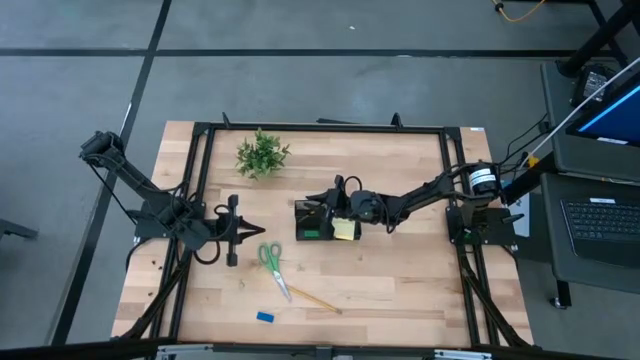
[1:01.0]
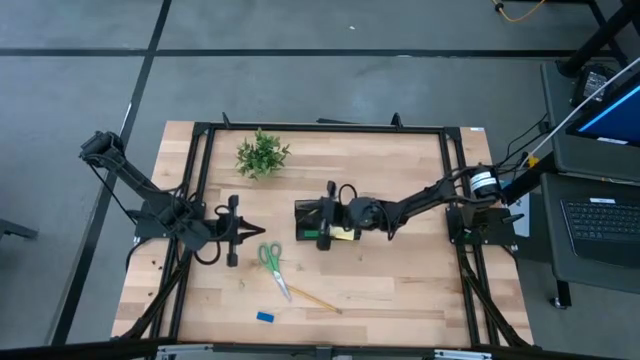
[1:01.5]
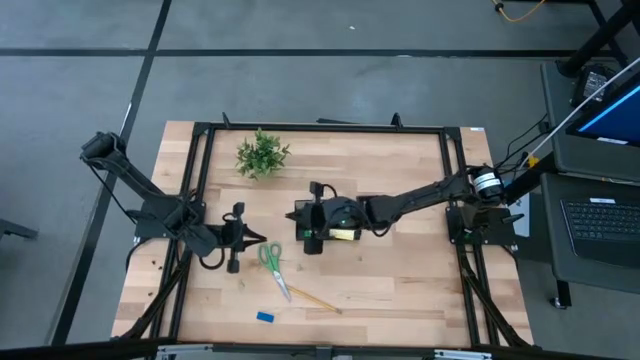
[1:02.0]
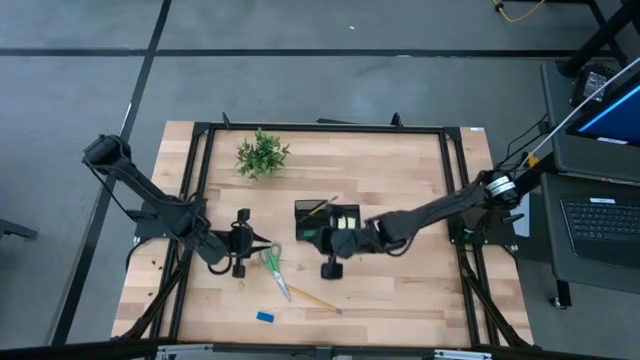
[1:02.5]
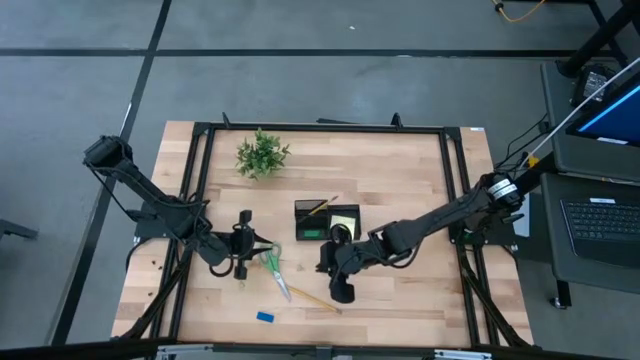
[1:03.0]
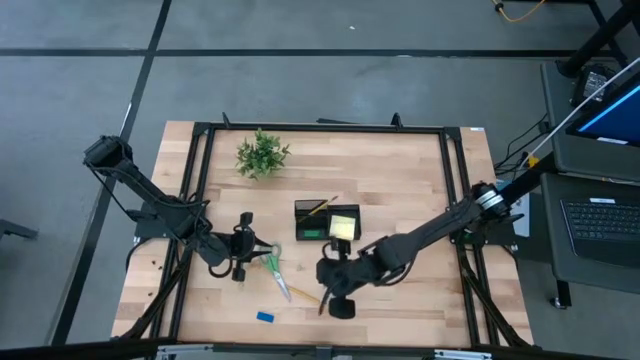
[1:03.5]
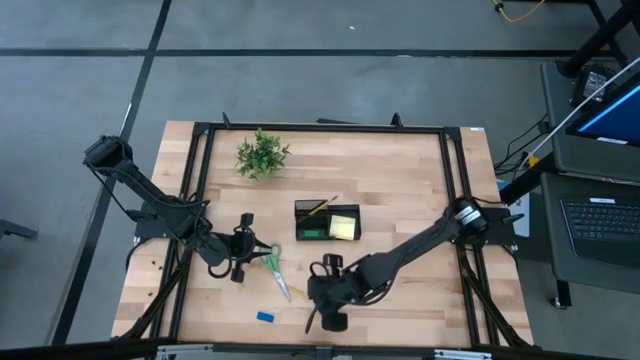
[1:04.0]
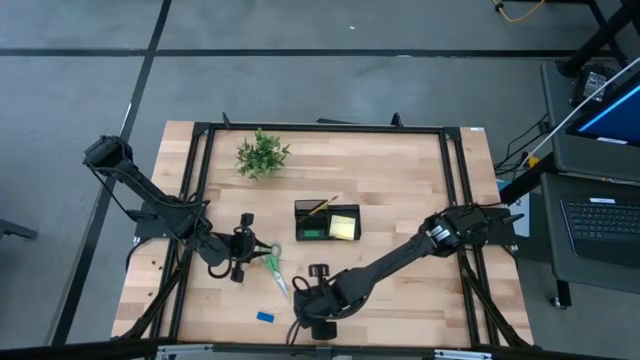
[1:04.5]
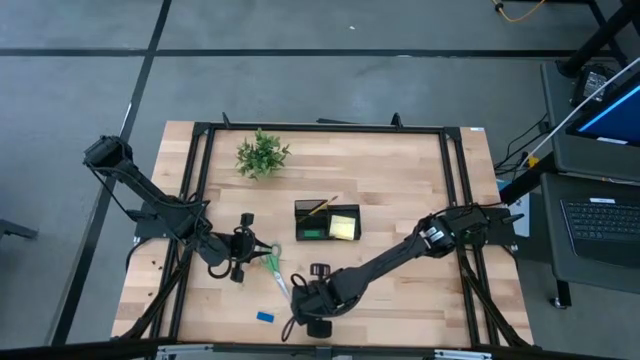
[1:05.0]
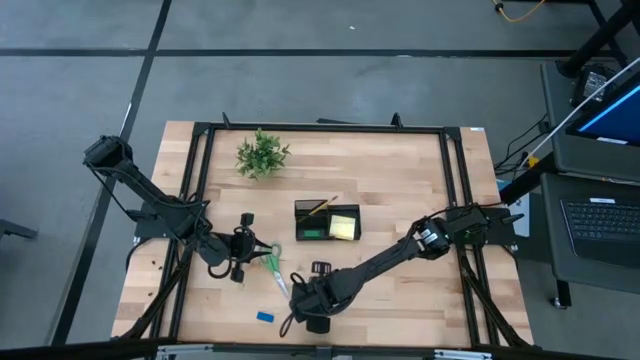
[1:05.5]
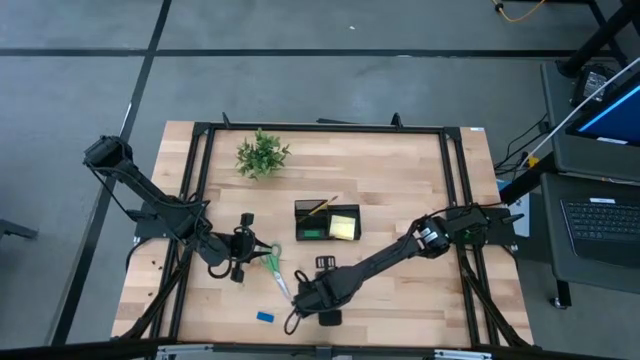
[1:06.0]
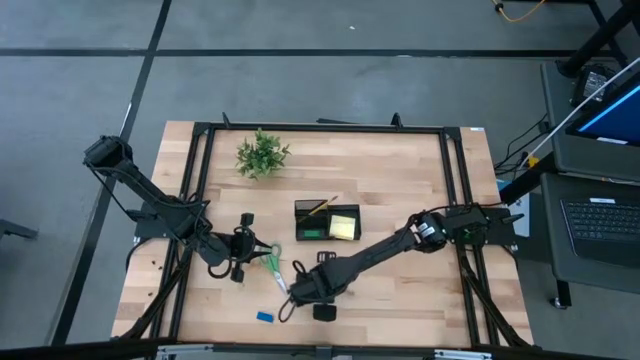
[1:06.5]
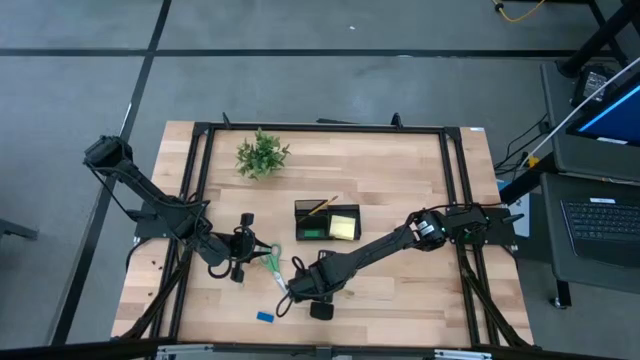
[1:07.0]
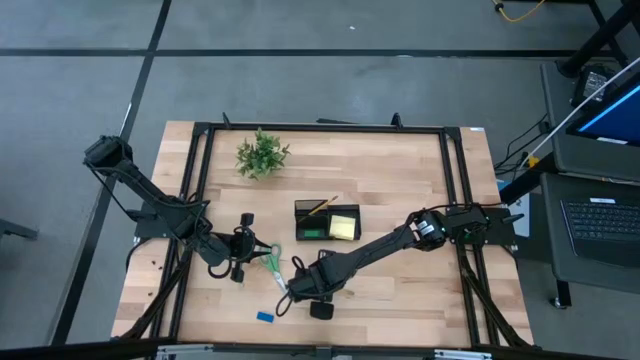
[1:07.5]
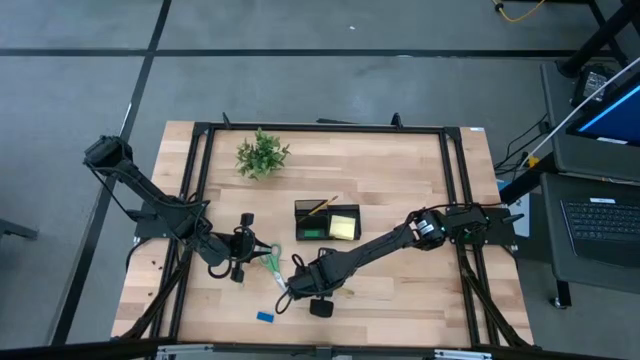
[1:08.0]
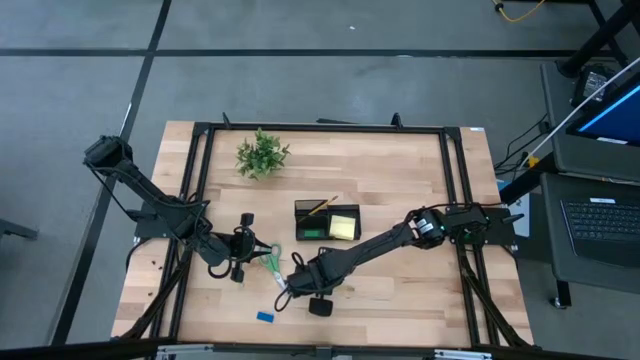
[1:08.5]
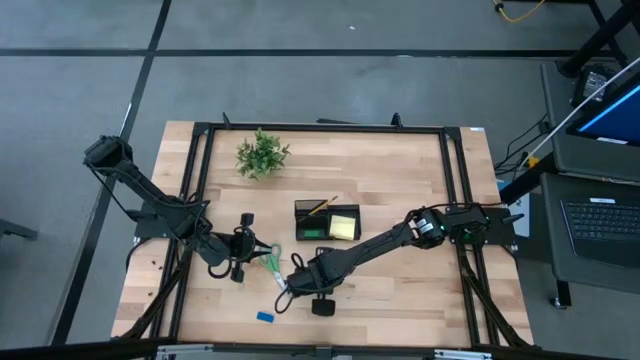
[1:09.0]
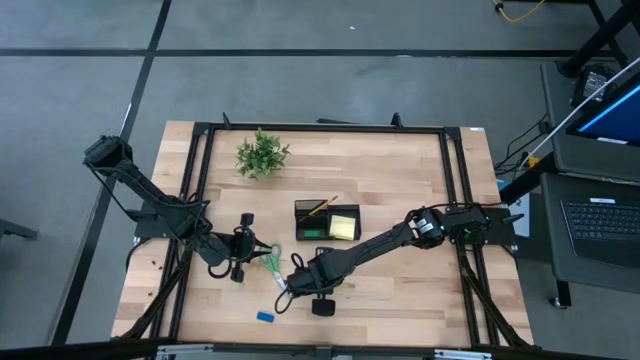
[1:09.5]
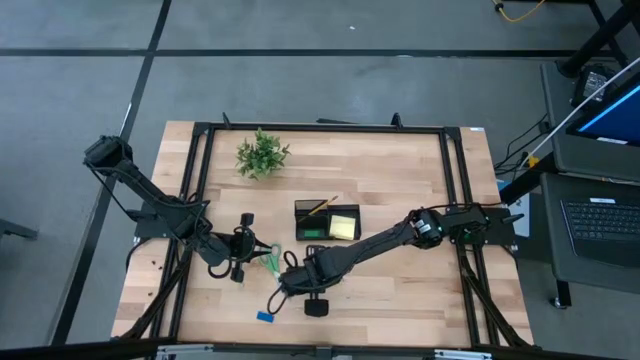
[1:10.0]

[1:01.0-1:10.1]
Task: Pick and place office supplies into organizer
Put the yellow pencil into the black desk organizer

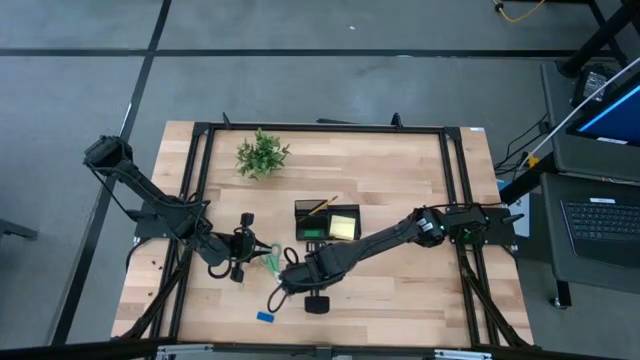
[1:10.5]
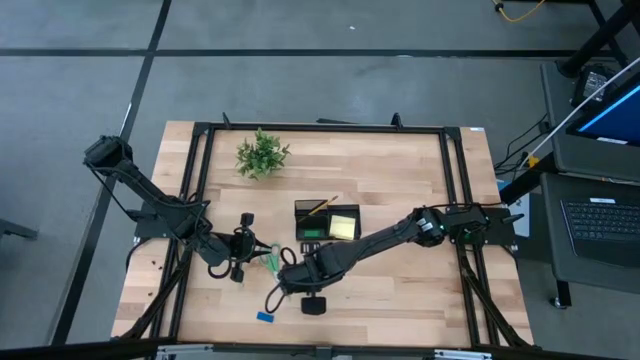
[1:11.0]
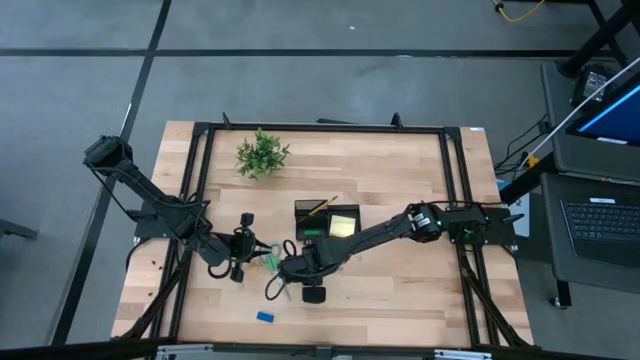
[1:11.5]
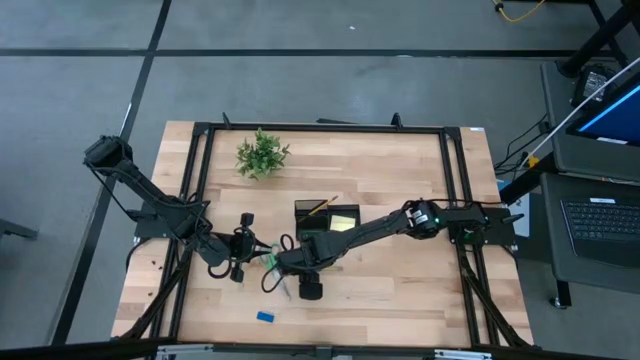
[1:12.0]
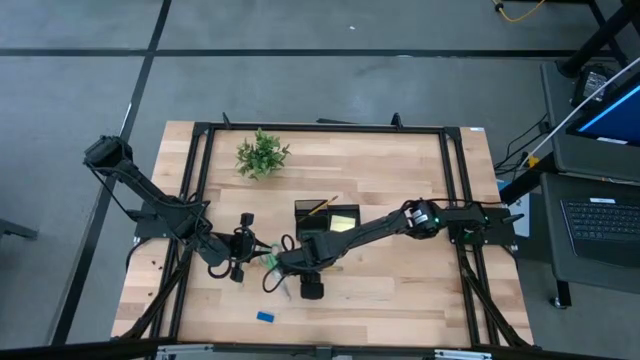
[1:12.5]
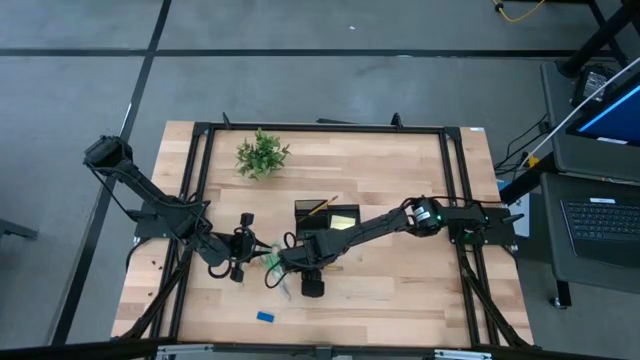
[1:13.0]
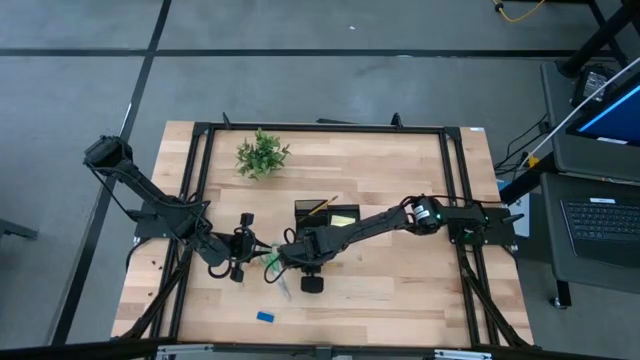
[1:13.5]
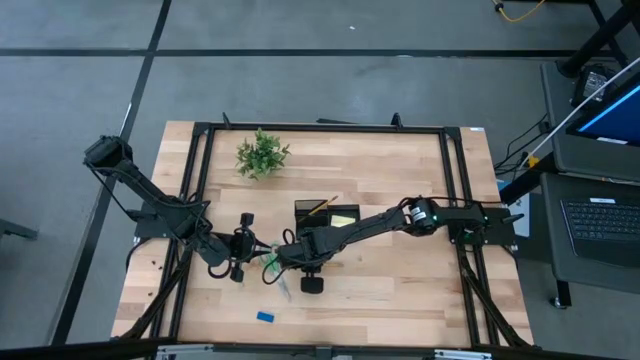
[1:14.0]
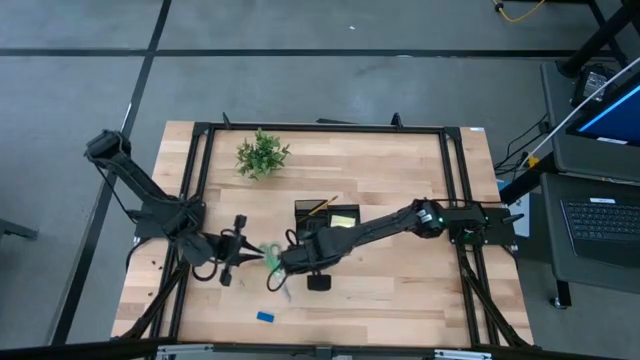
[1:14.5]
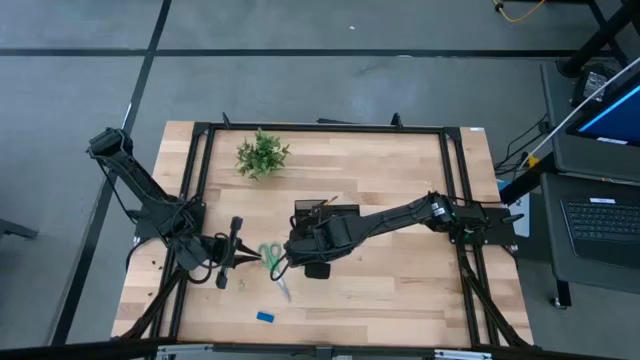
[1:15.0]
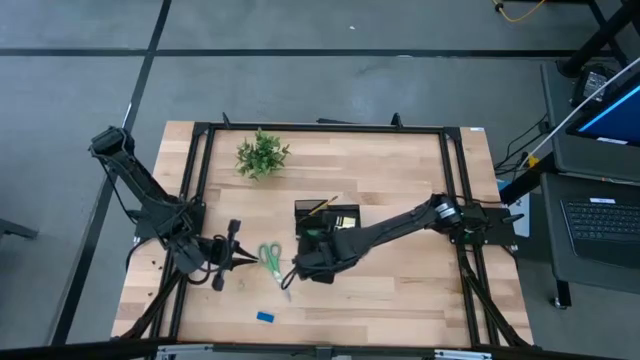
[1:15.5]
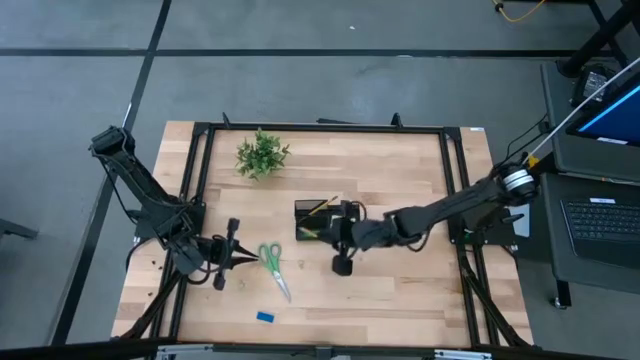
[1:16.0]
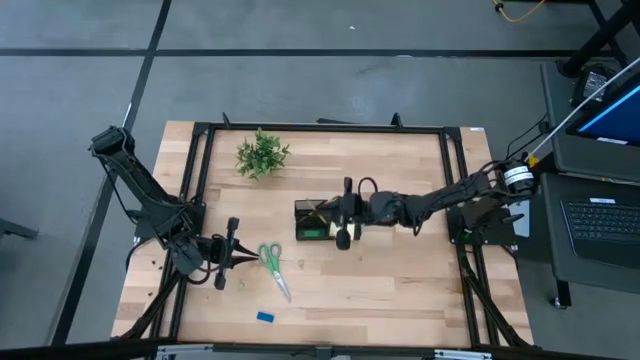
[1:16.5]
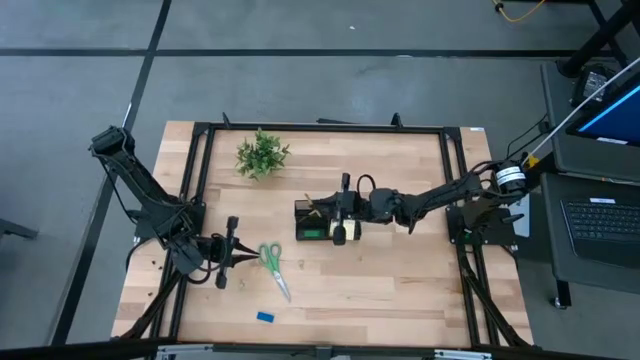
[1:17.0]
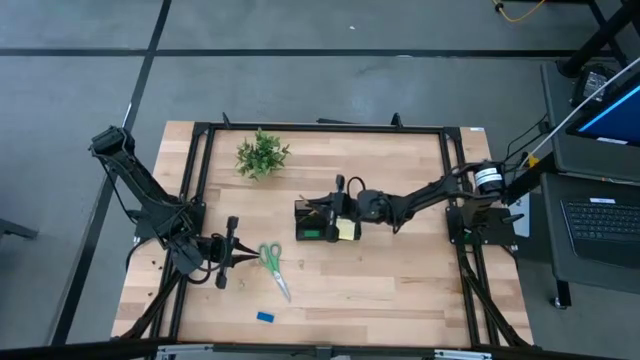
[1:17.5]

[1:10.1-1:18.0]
Put the yellow pencil into the black desk organizer

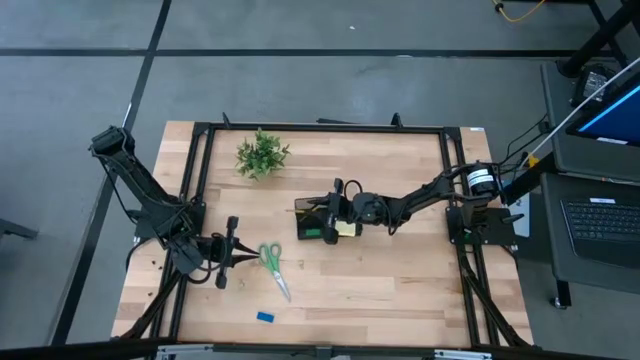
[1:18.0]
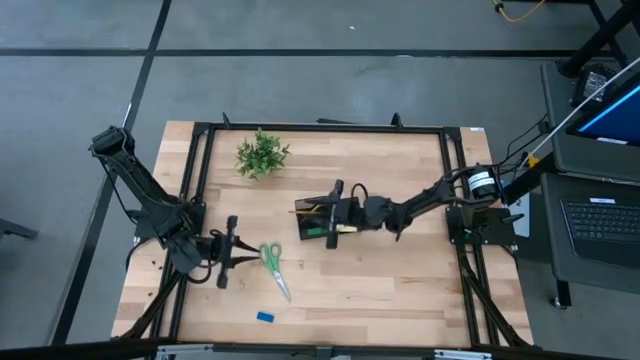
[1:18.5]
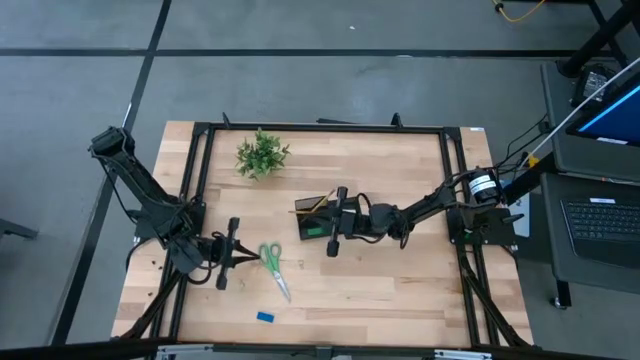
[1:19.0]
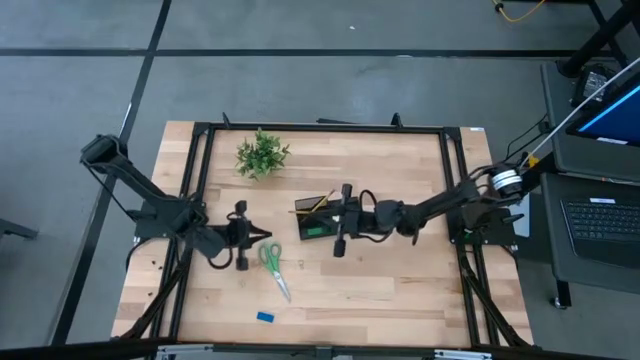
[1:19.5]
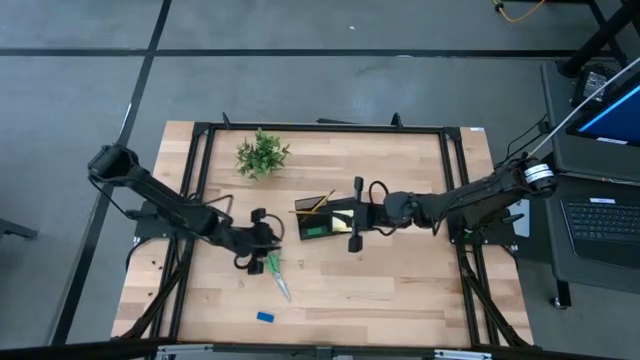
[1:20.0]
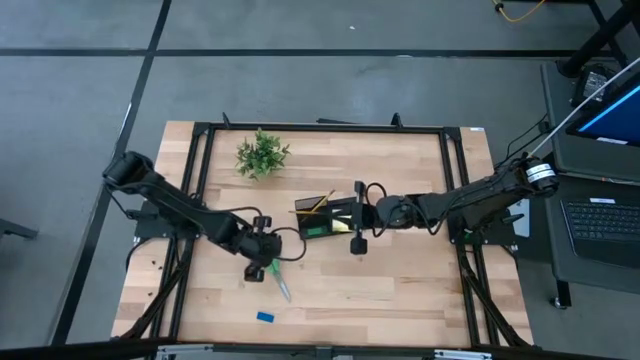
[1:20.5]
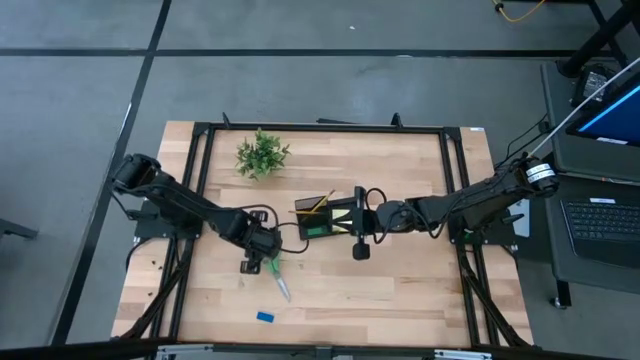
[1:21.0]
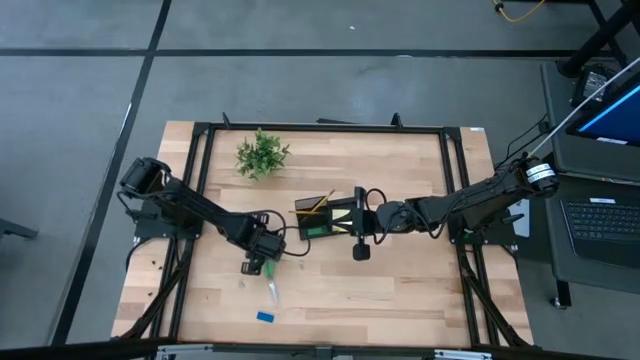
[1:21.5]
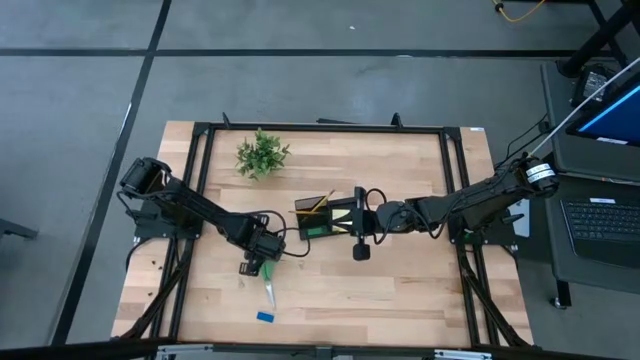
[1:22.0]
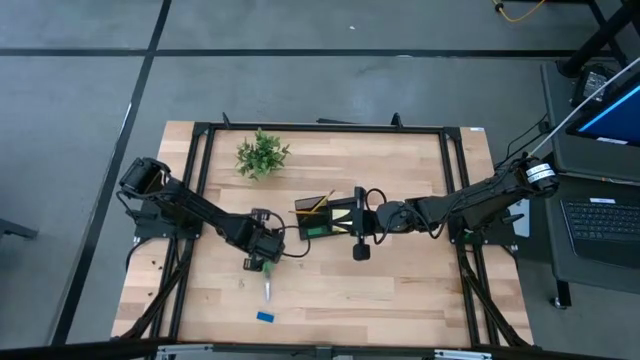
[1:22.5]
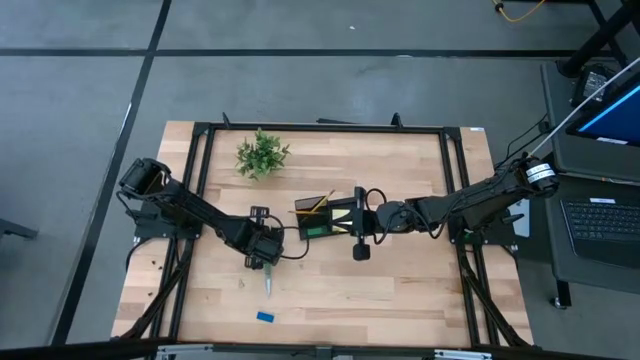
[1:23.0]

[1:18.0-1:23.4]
Put the green scissors into the black desk organizer
